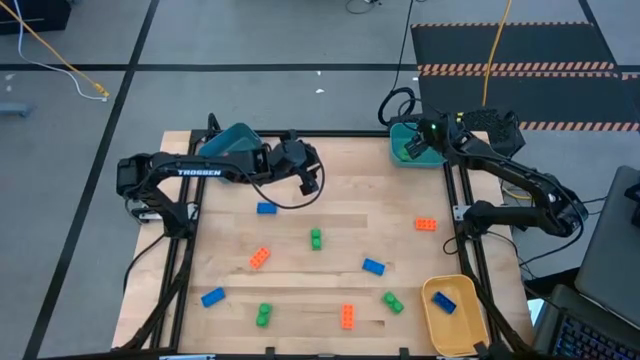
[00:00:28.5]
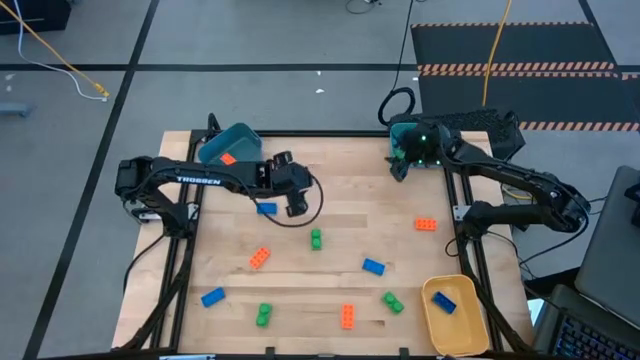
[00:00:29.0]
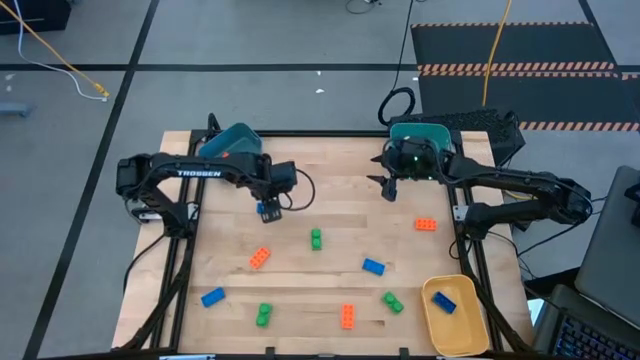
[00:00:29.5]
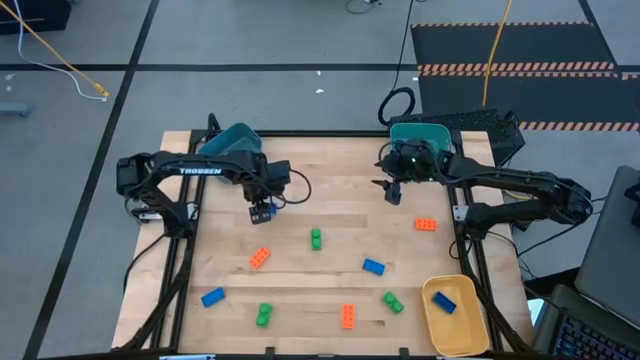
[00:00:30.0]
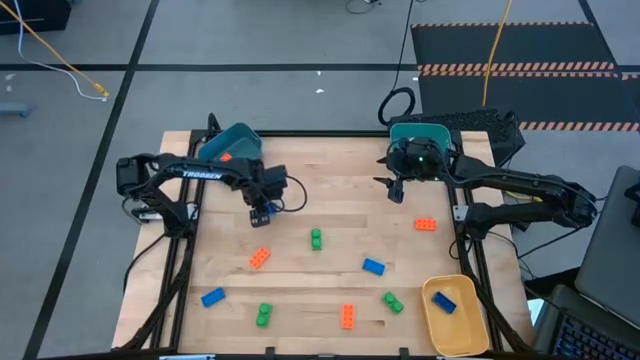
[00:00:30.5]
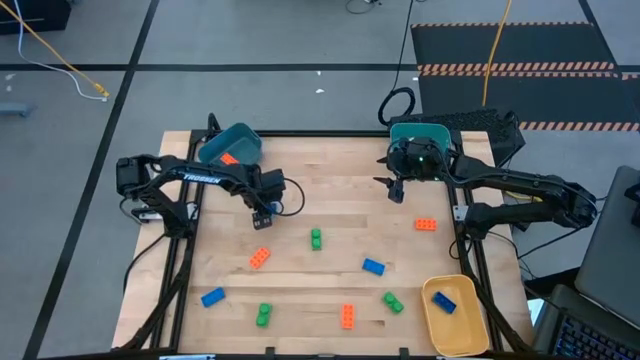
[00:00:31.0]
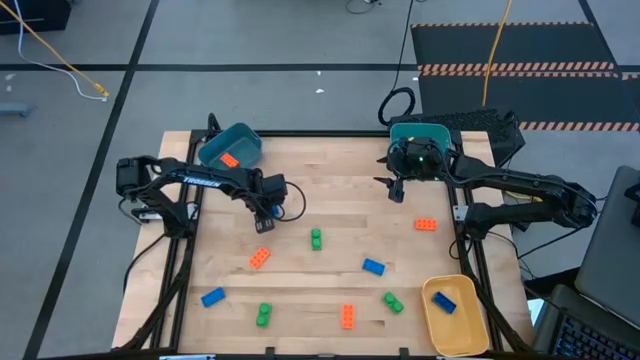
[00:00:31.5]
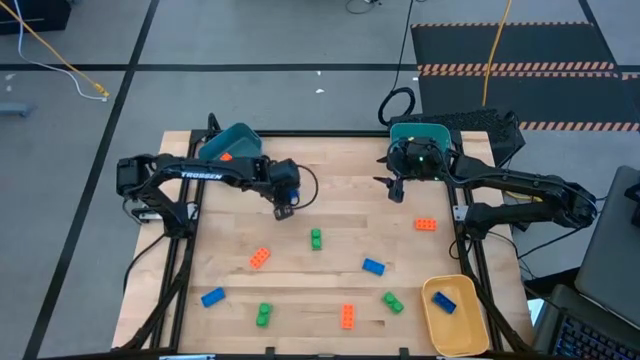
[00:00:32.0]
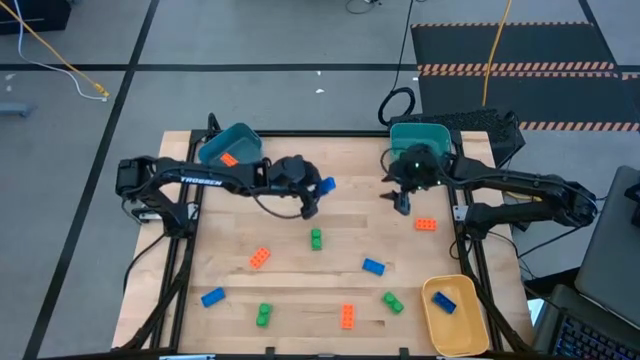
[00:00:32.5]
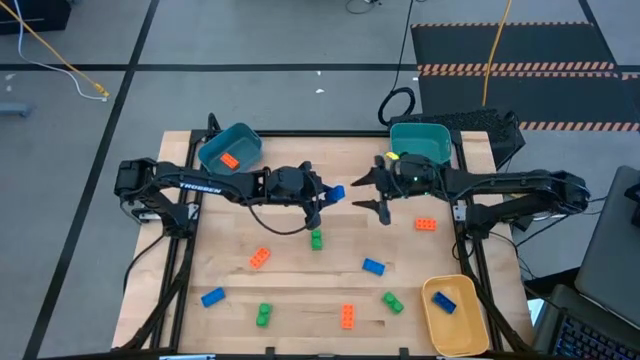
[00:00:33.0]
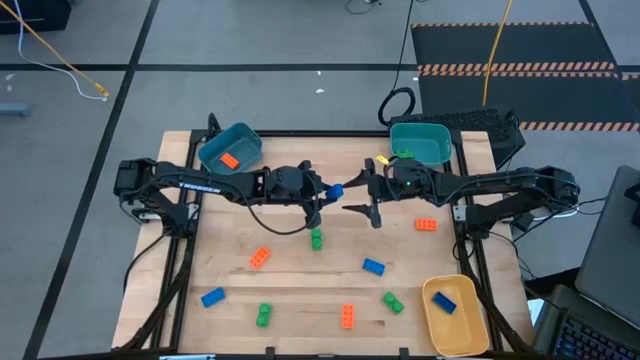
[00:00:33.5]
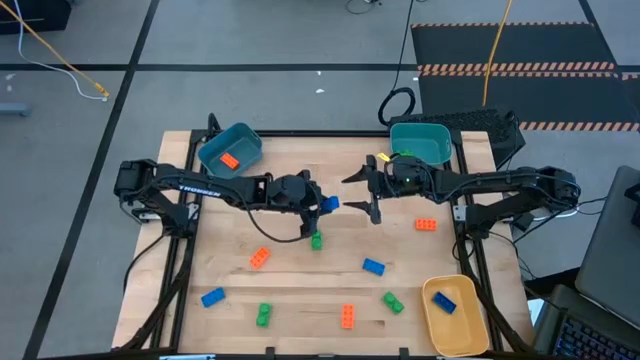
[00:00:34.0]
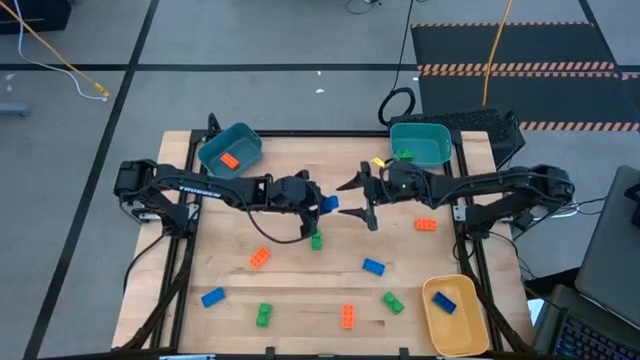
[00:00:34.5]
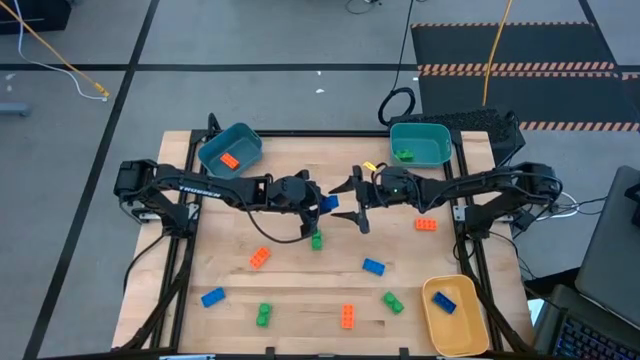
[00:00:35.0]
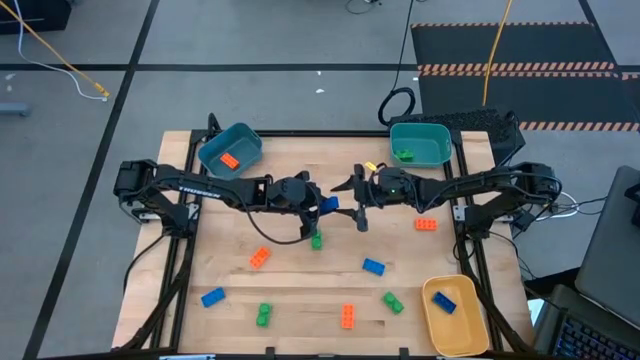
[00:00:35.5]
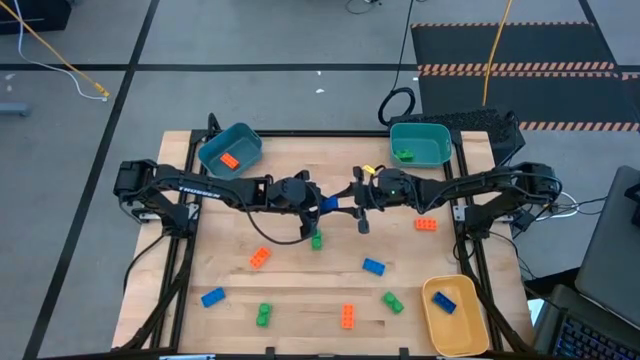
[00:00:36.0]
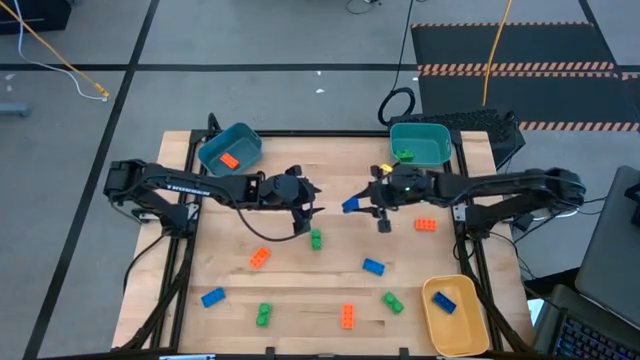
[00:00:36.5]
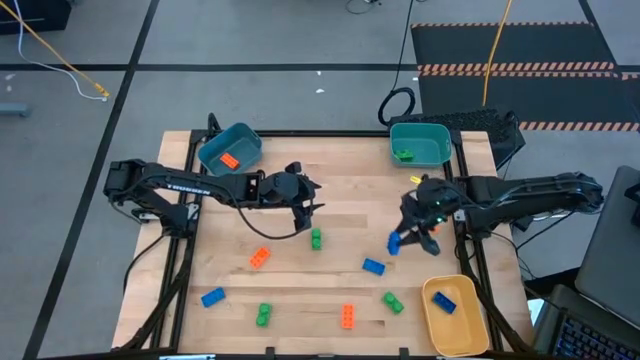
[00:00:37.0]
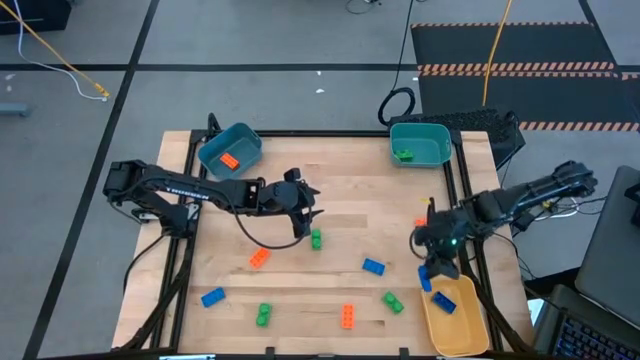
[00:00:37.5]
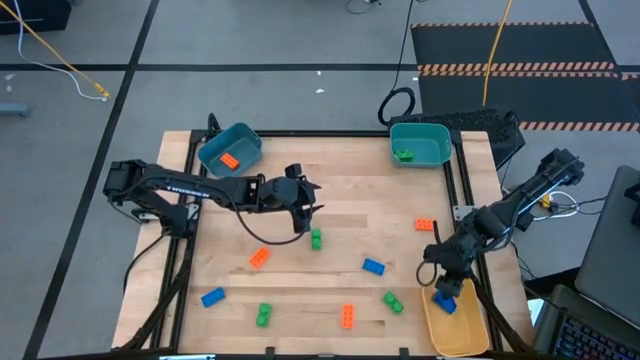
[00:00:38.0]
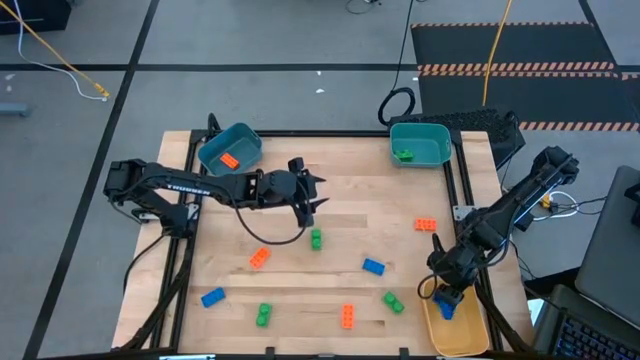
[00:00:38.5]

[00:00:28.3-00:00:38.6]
Task: Sort & place blocks by color
Put the top blue game piece into the yellow bin

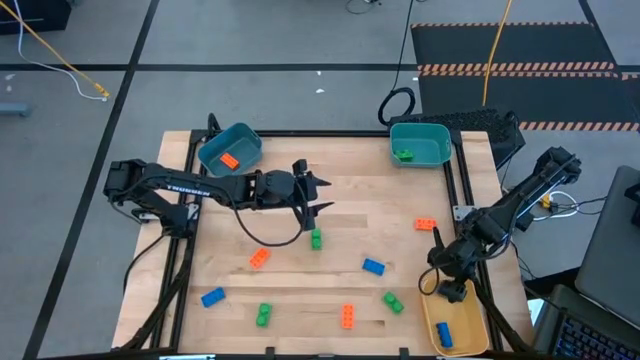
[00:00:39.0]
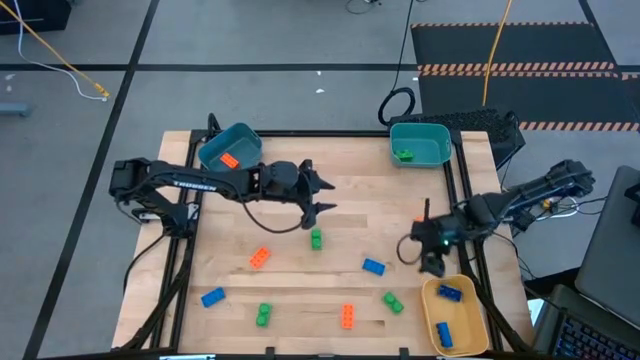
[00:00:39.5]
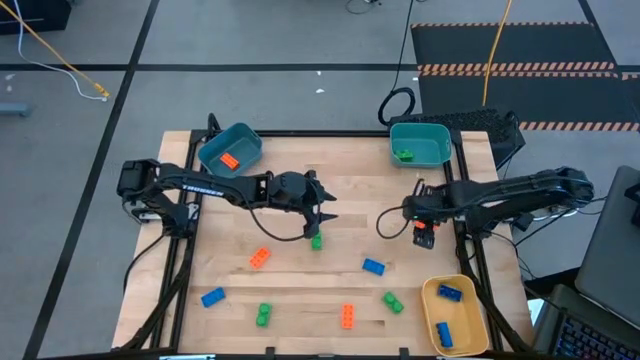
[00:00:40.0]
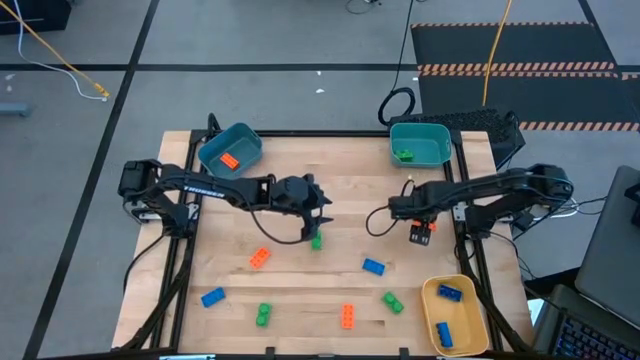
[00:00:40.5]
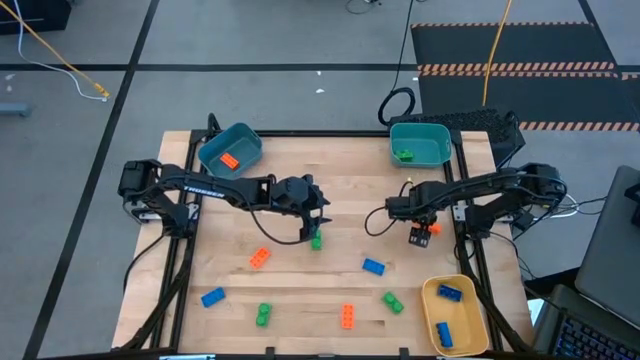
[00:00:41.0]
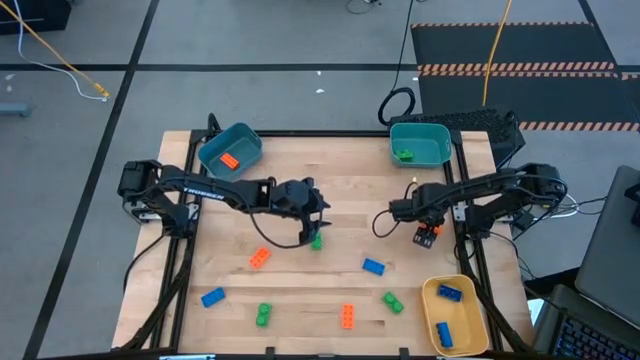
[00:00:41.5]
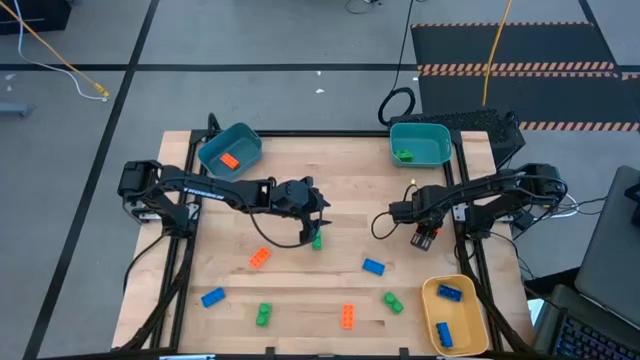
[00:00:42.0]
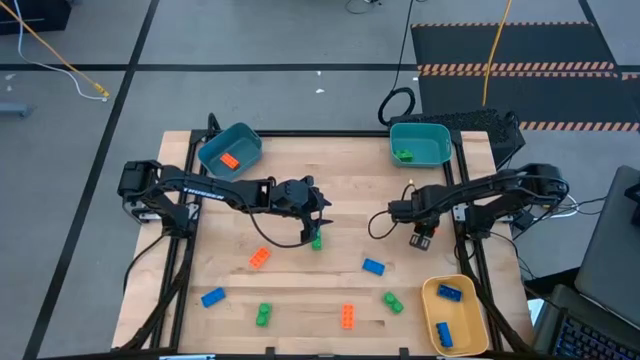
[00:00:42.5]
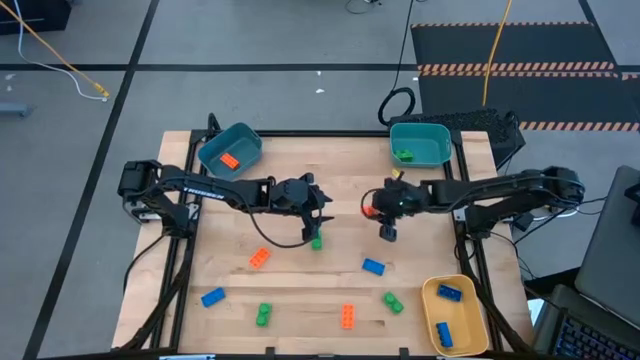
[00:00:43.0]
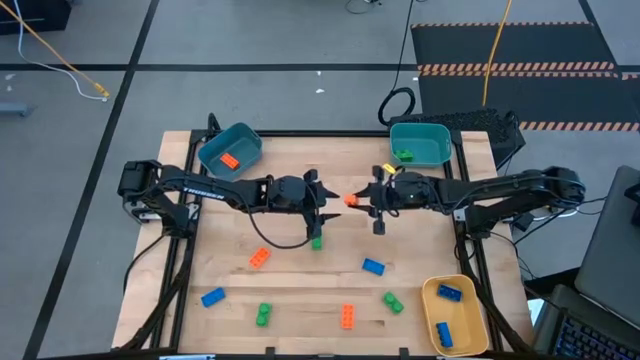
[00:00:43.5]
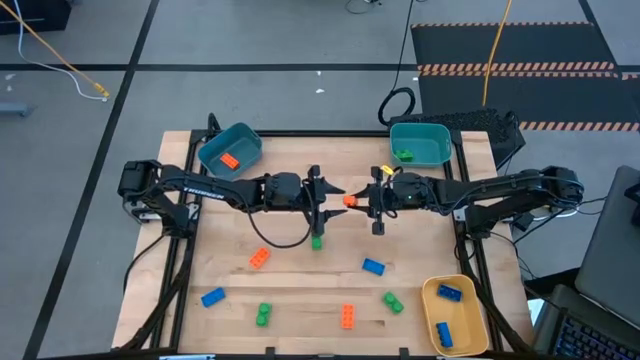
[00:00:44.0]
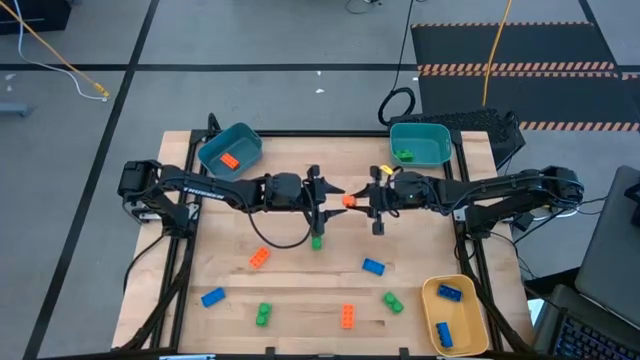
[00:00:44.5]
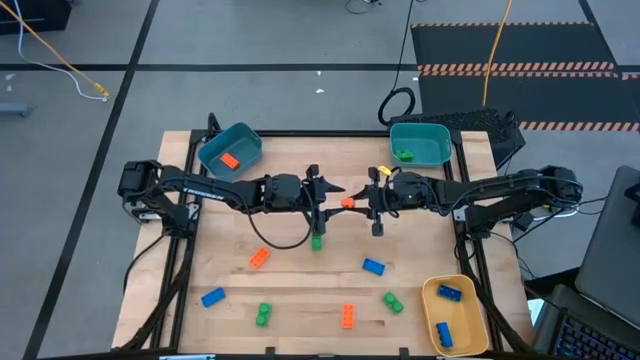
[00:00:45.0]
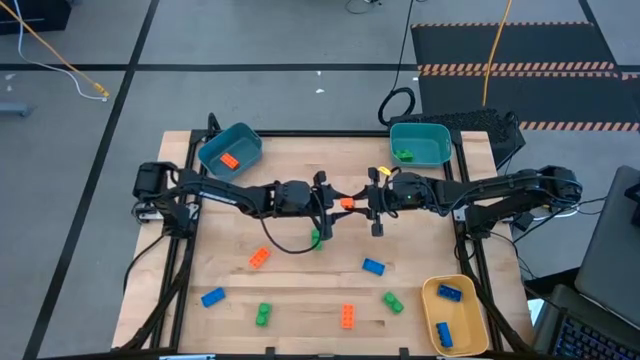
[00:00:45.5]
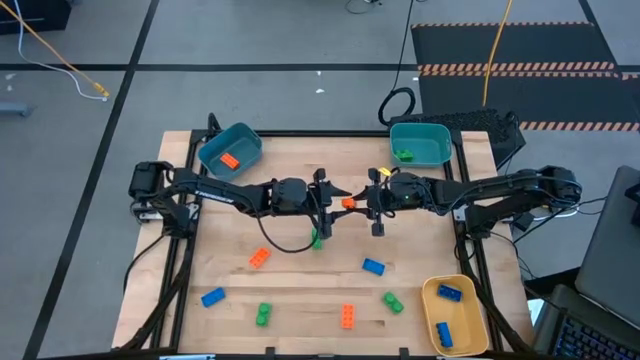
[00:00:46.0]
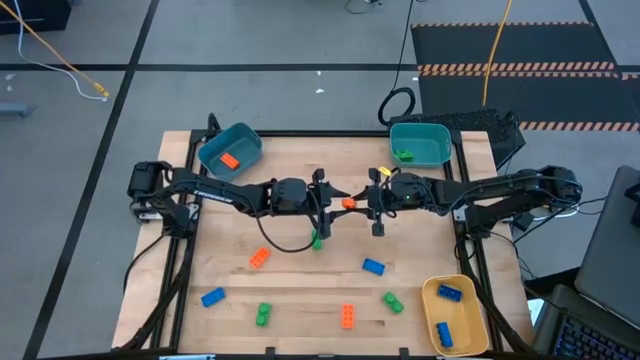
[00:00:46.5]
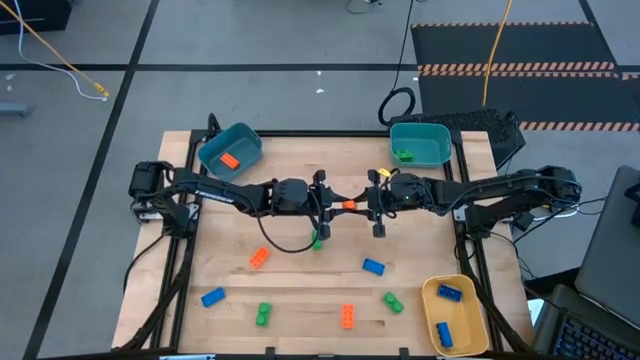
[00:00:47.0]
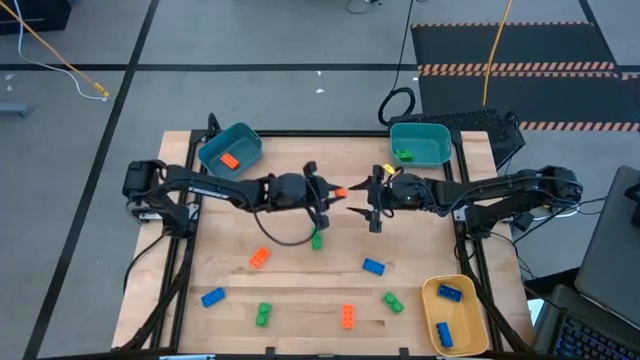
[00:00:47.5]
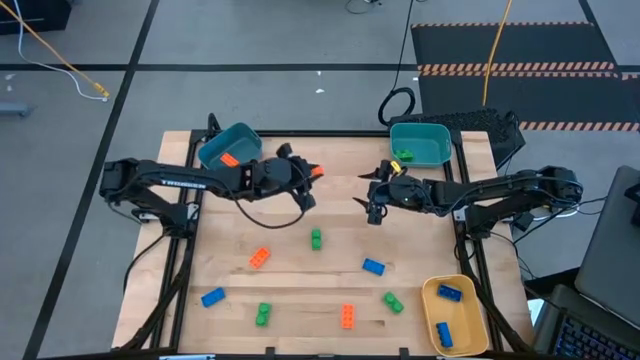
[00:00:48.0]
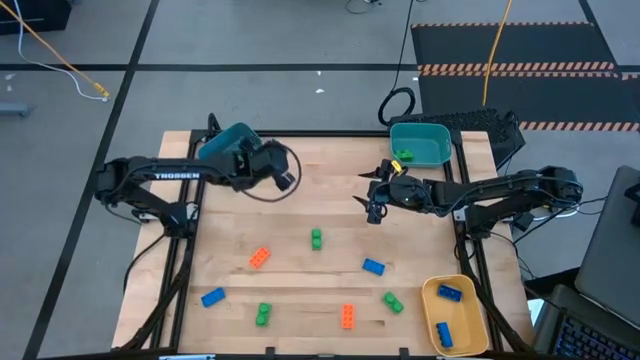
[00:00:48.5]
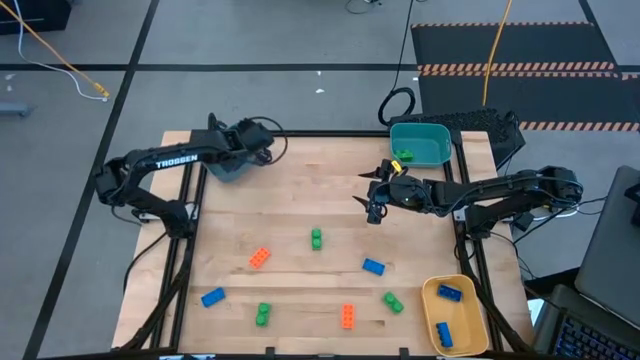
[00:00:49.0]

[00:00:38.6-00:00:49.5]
Put the right orange game piece into the dark blue bin
